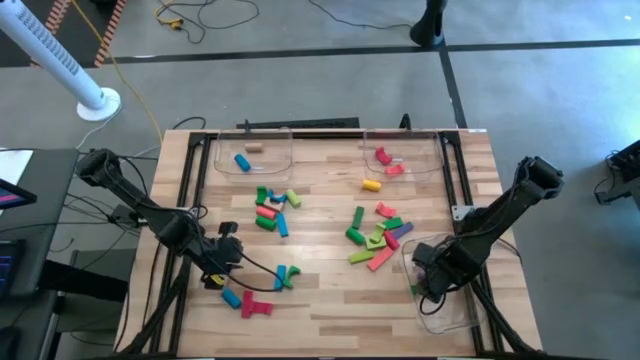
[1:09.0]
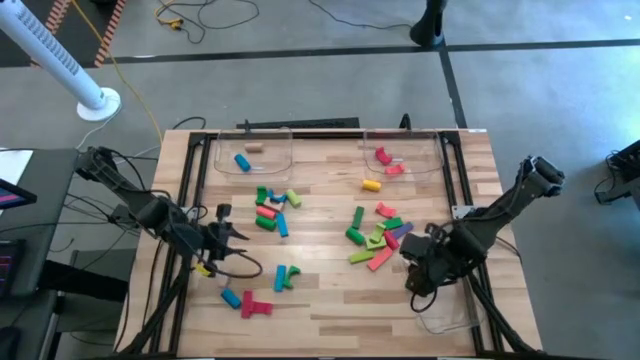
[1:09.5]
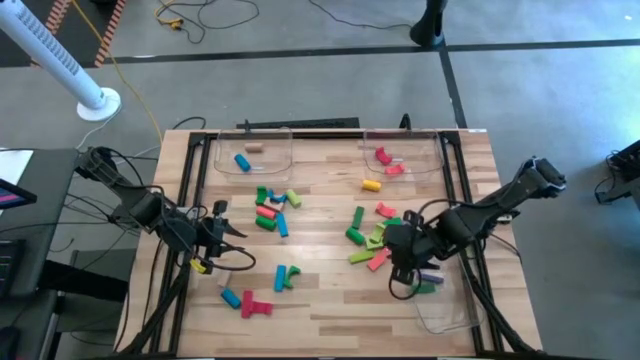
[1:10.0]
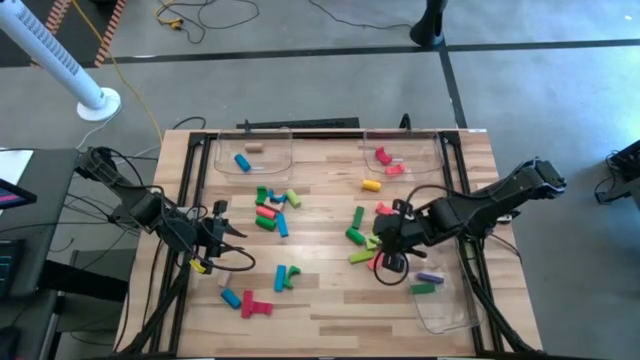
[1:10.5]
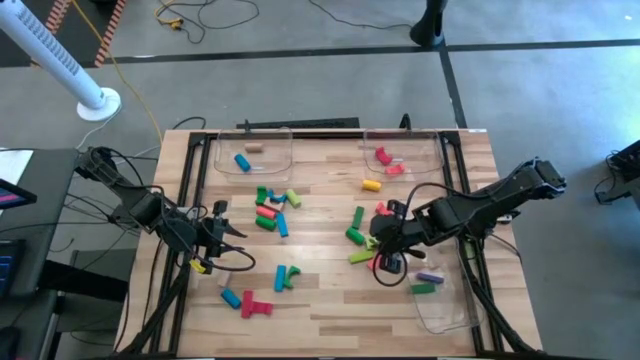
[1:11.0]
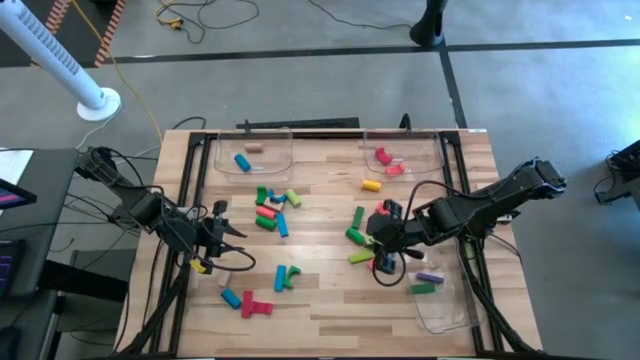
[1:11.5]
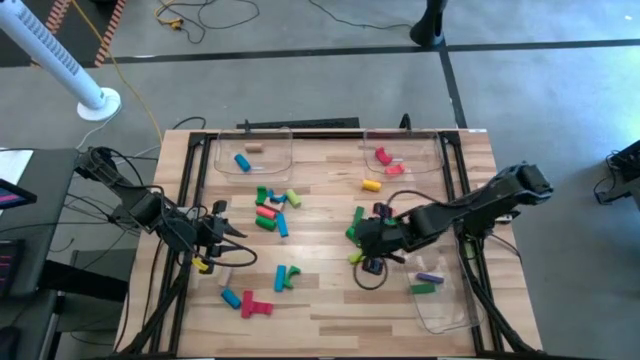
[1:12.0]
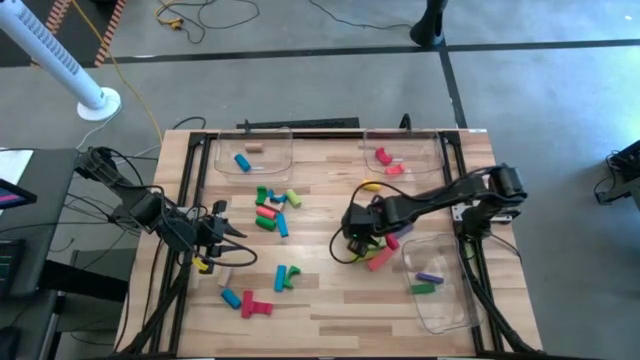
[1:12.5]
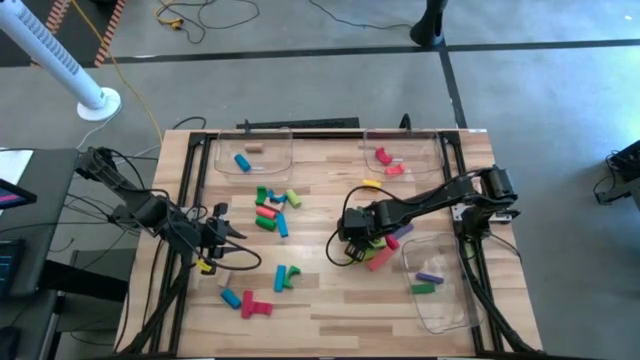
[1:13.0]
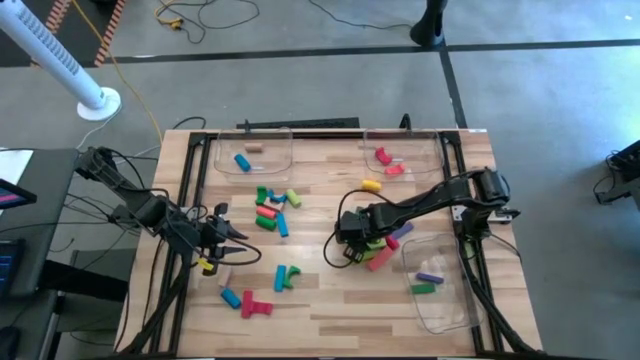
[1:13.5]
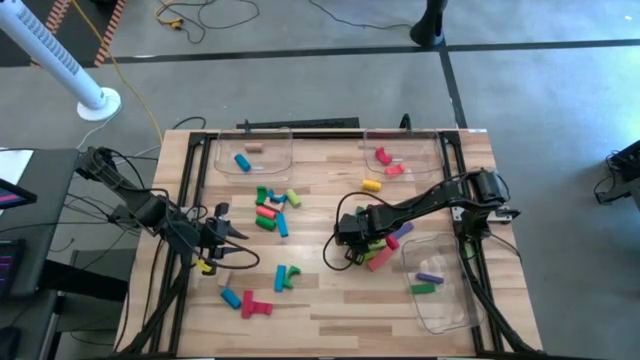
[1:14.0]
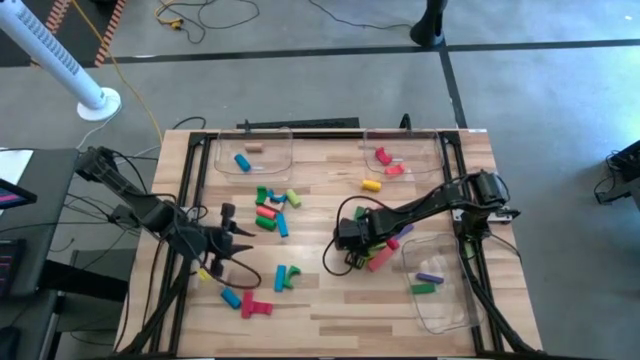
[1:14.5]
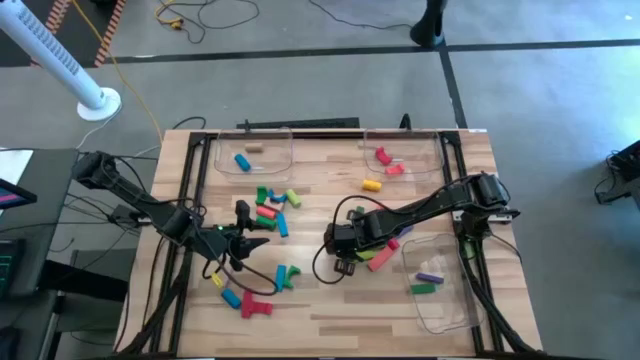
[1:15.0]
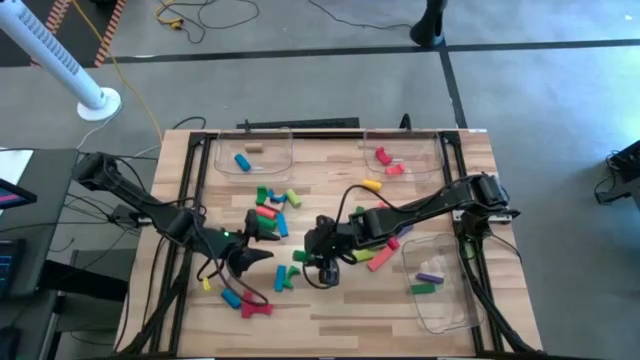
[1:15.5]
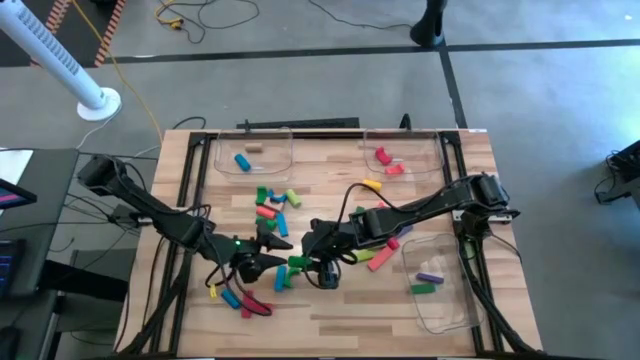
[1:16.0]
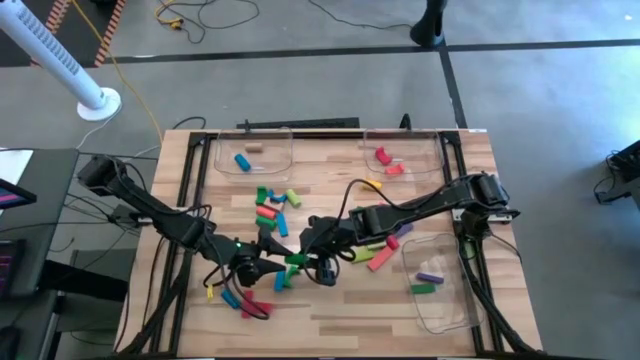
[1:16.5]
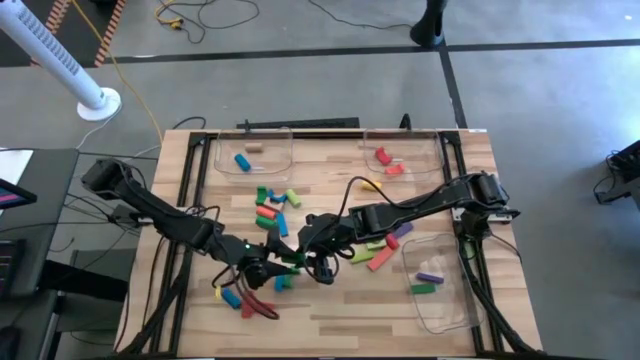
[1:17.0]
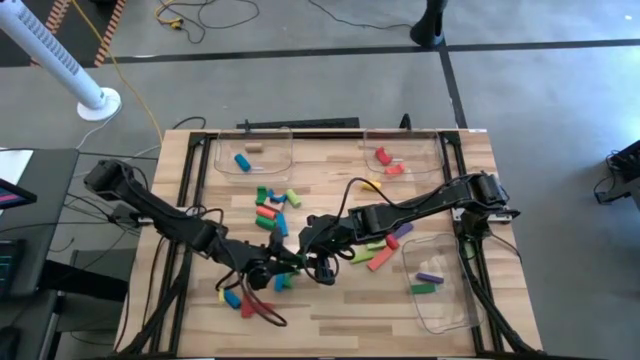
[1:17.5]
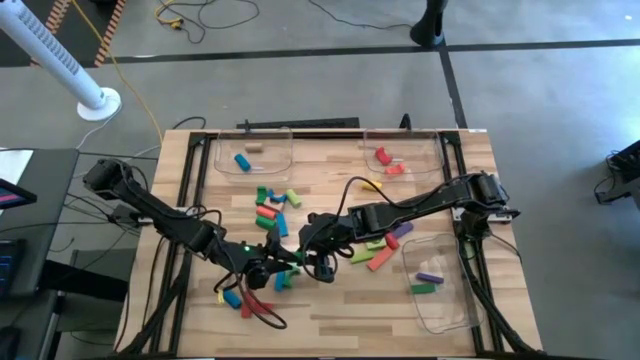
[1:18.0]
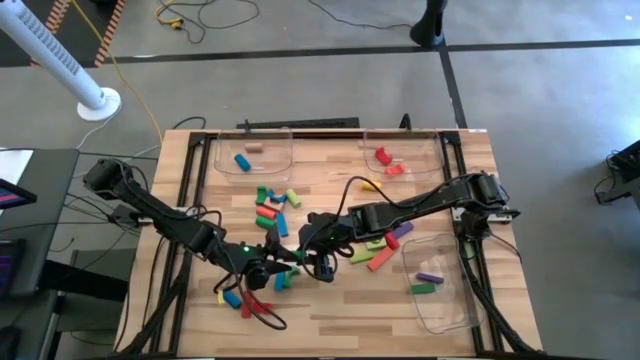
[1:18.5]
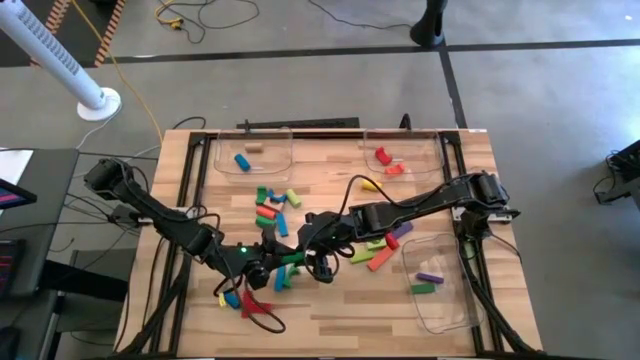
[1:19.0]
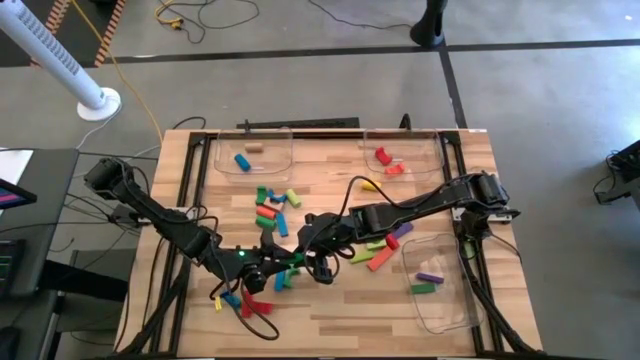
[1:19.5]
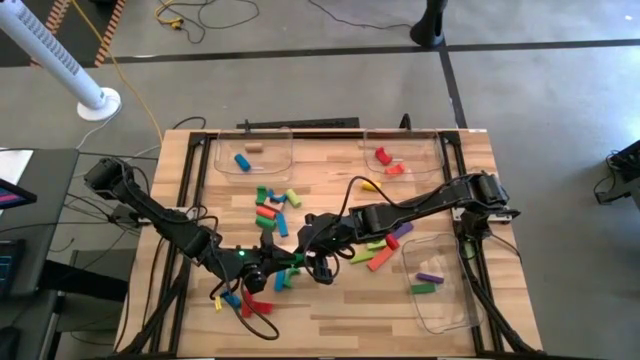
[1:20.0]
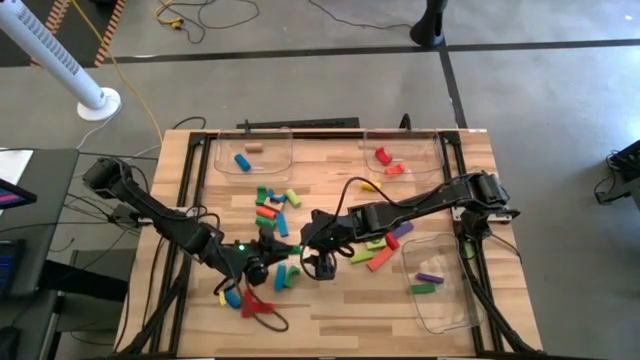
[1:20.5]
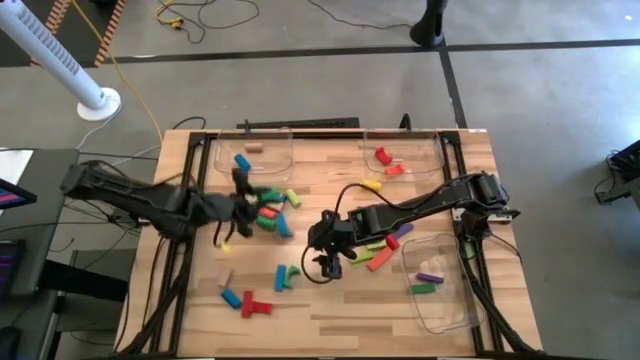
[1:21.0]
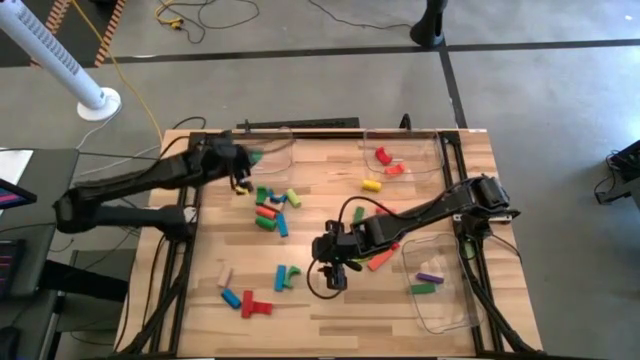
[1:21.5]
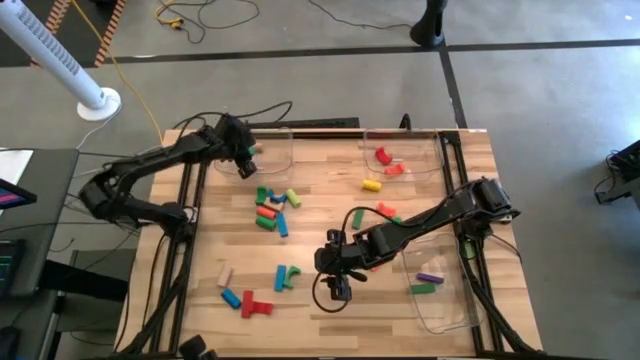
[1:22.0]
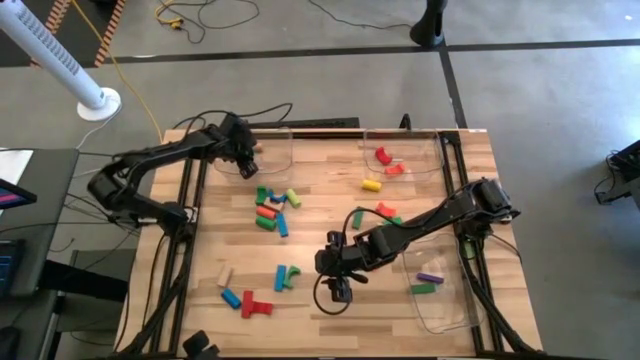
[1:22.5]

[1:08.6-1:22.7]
Task: Sort blocks by size
Put the green cylindrical block into the top left transparent bin

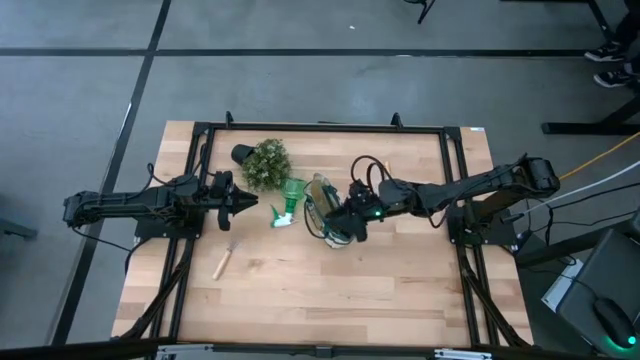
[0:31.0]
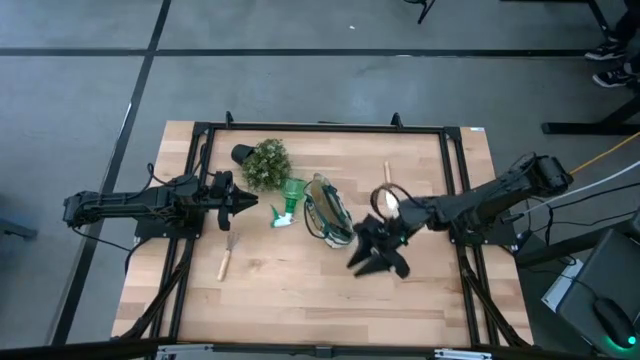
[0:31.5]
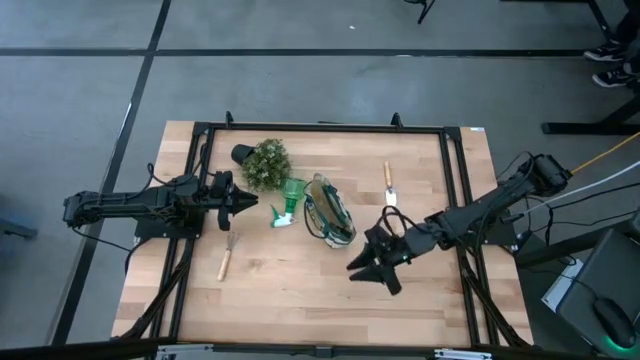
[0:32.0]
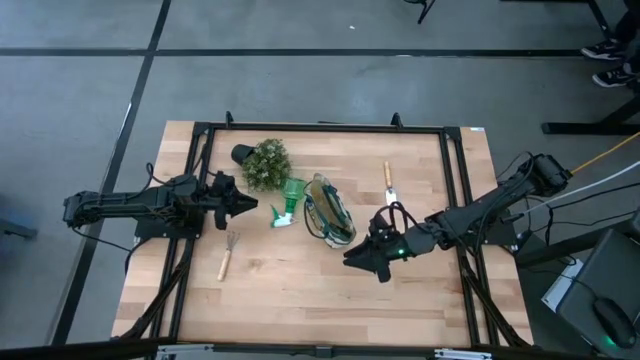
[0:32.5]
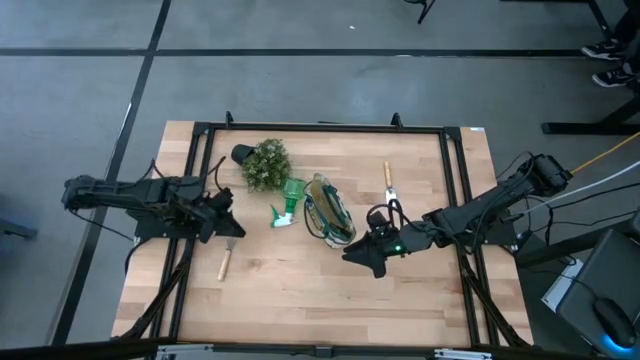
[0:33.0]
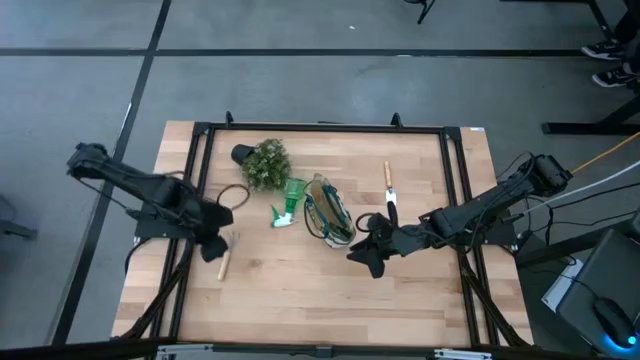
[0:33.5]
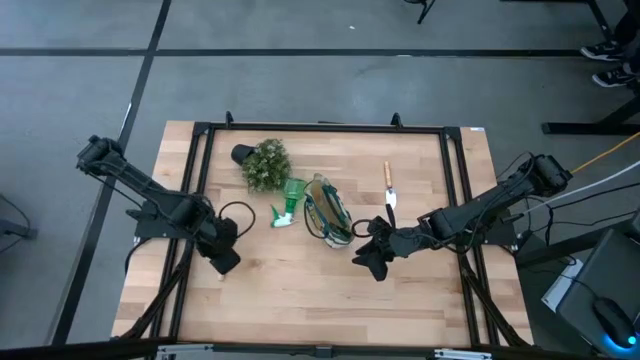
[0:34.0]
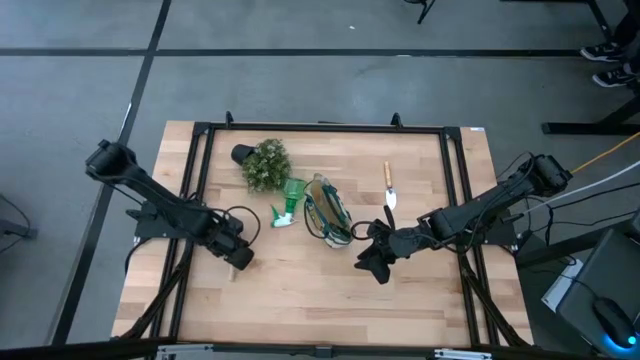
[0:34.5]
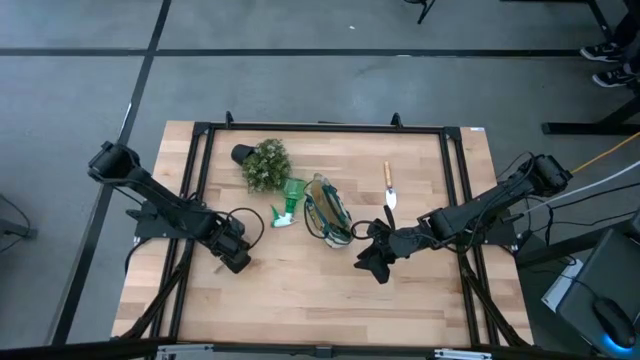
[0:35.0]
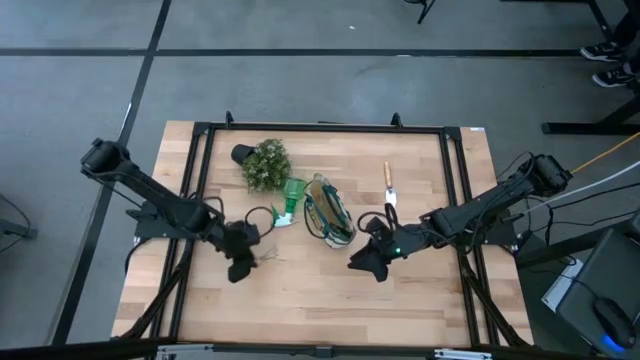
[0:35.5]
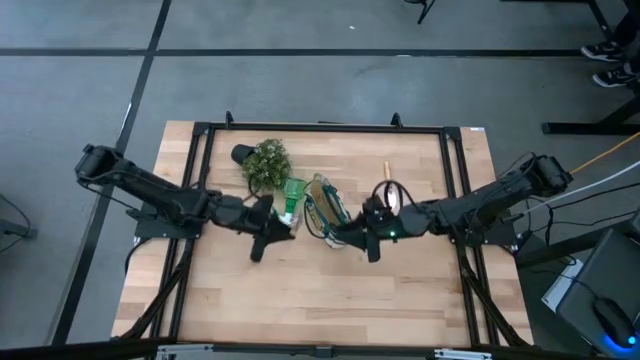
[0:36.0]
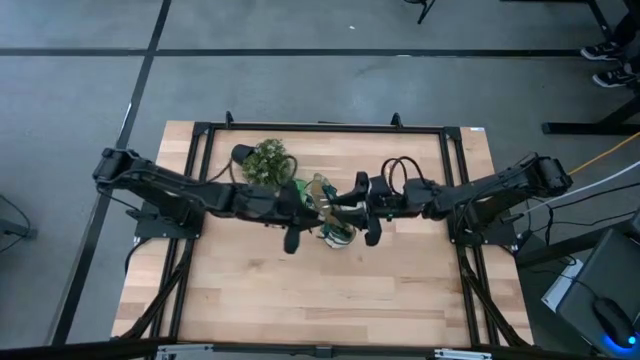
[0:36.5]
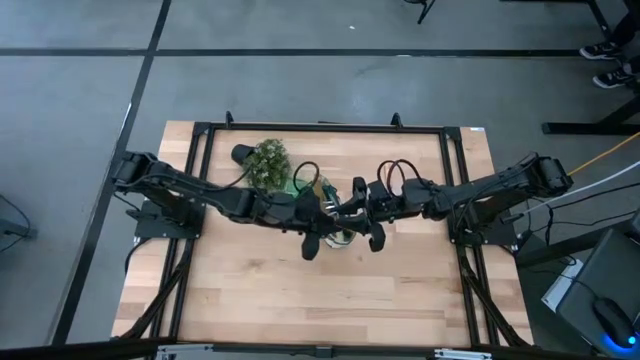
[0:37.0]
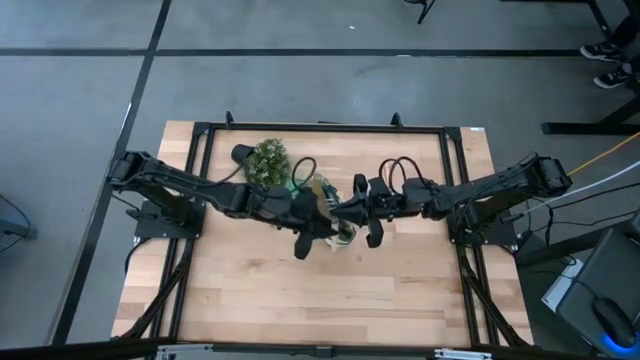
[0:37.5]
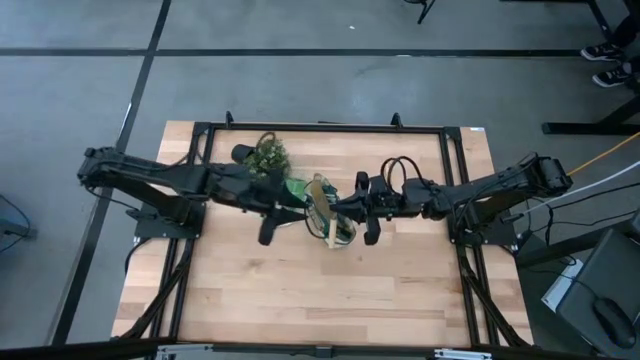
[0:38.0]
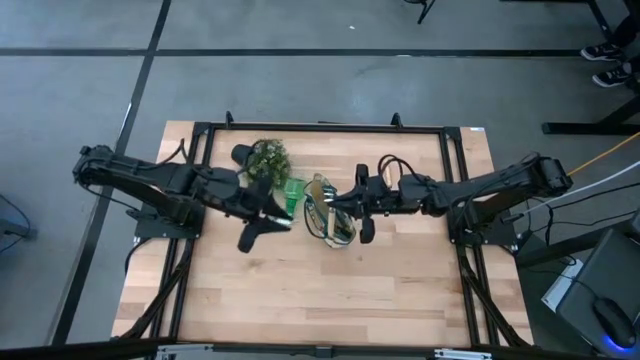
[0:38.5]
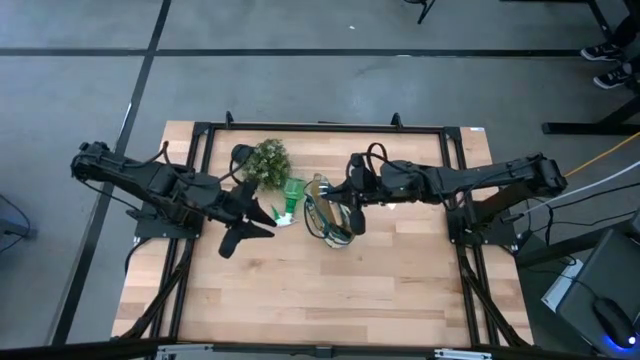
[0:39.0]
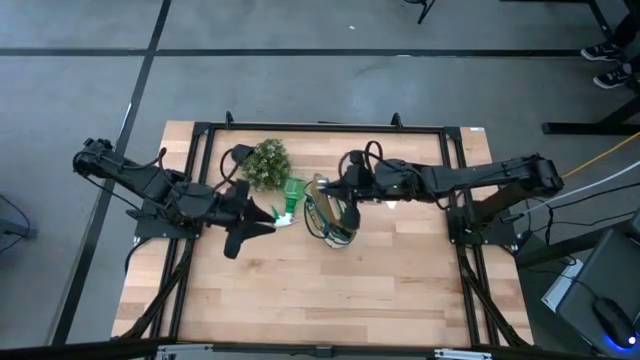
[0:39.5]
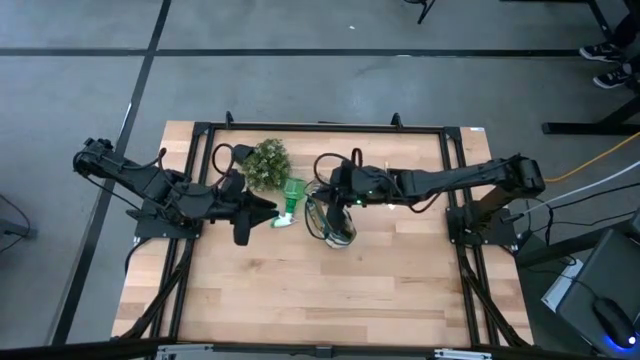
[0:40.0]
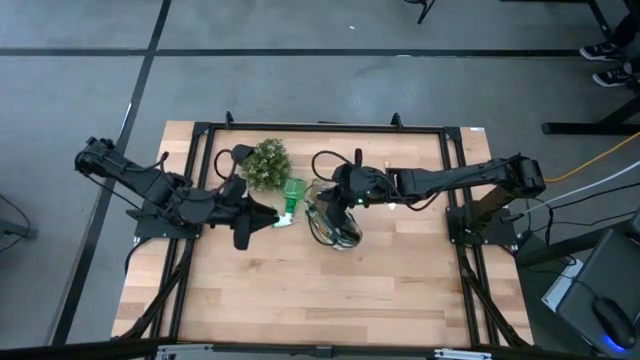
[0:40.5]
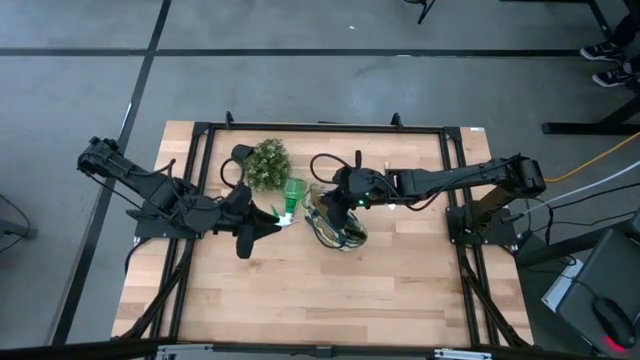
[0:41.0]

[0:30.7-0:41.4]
Task: Pick & Place Garden tools in Gardening bag
Put the light brown hand rake into the light brown gardening bag
